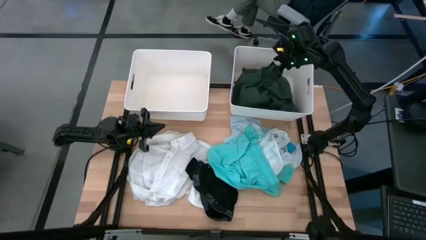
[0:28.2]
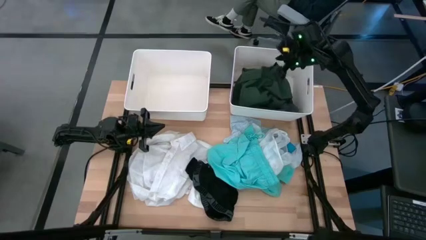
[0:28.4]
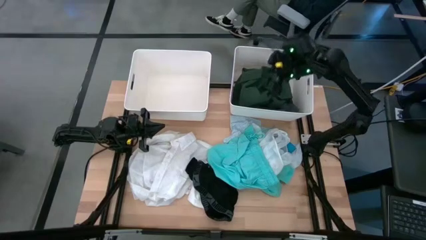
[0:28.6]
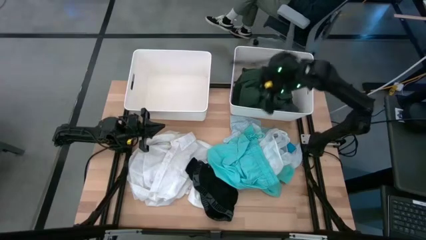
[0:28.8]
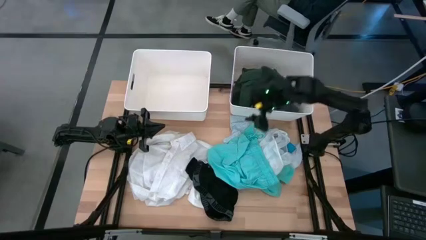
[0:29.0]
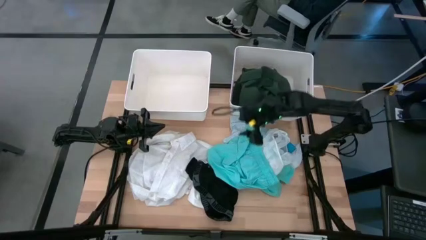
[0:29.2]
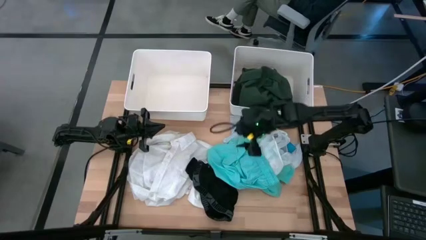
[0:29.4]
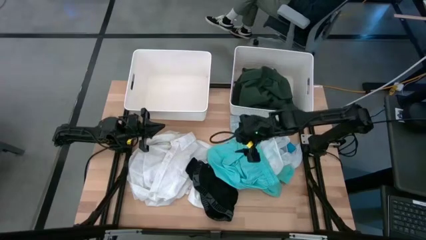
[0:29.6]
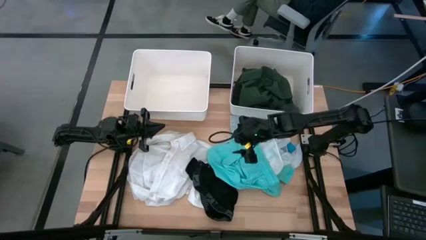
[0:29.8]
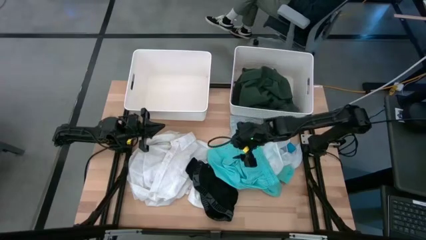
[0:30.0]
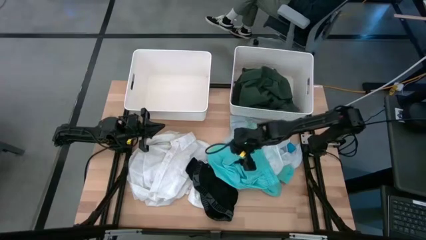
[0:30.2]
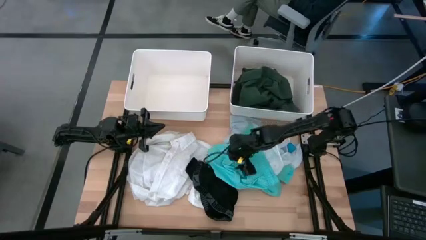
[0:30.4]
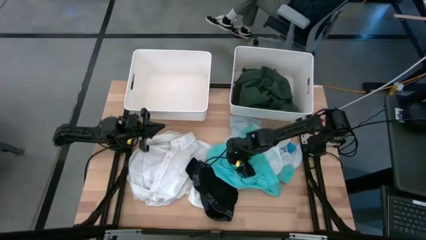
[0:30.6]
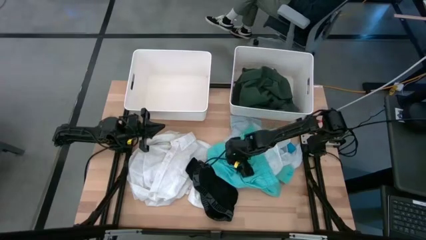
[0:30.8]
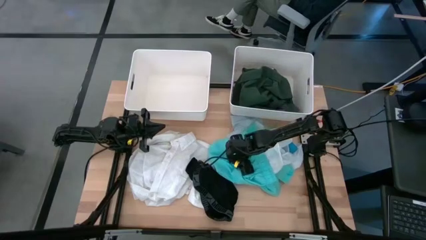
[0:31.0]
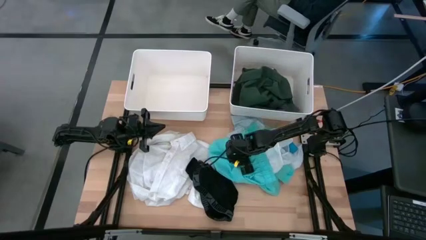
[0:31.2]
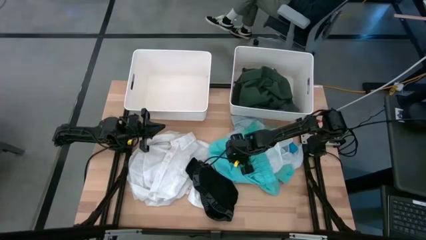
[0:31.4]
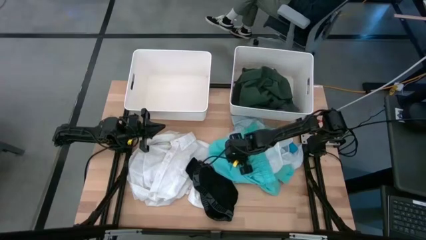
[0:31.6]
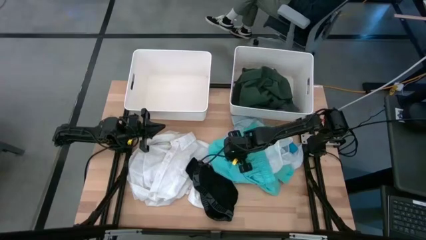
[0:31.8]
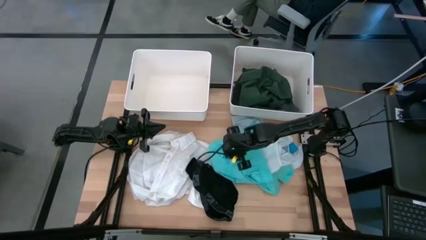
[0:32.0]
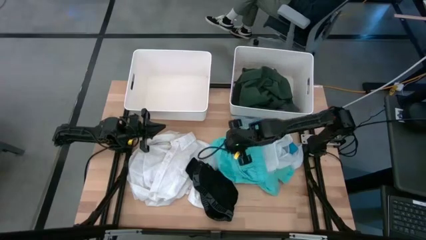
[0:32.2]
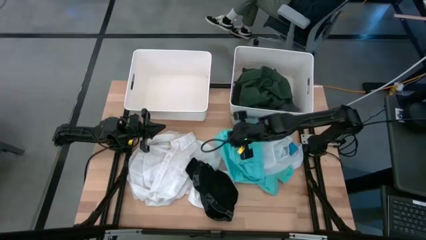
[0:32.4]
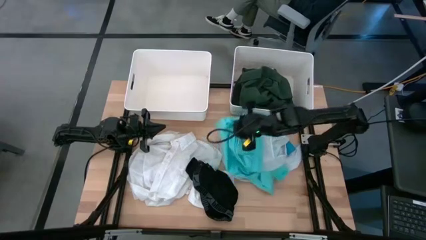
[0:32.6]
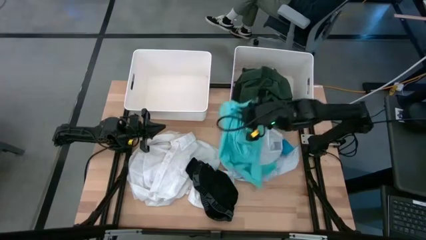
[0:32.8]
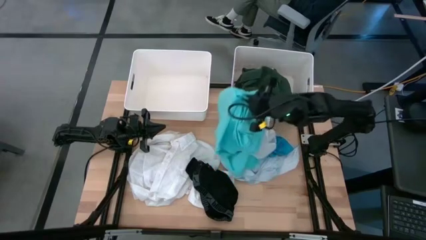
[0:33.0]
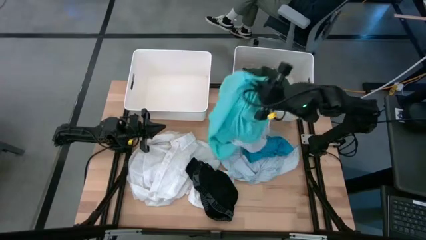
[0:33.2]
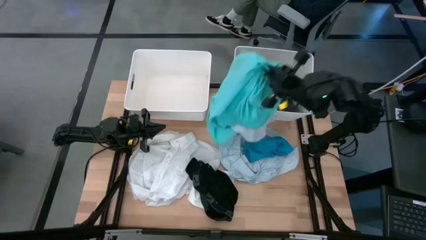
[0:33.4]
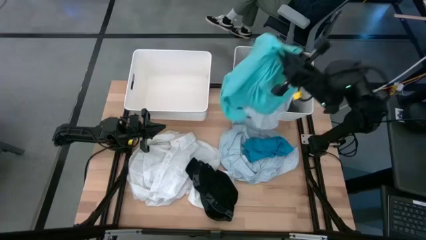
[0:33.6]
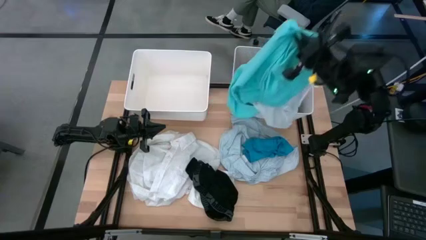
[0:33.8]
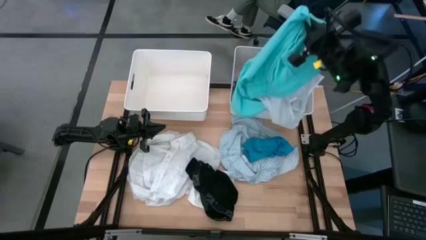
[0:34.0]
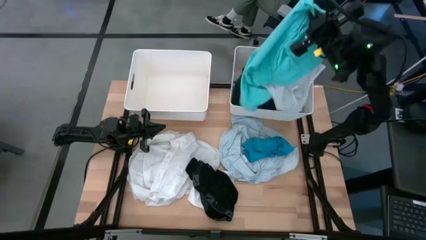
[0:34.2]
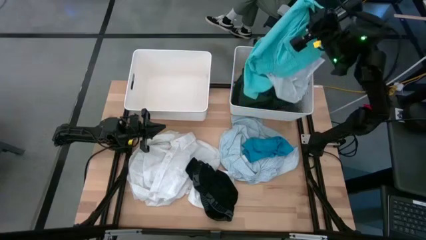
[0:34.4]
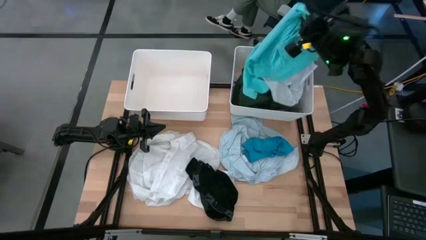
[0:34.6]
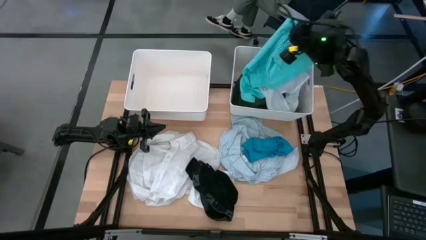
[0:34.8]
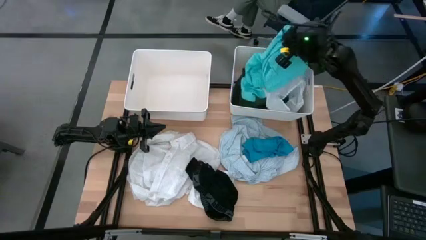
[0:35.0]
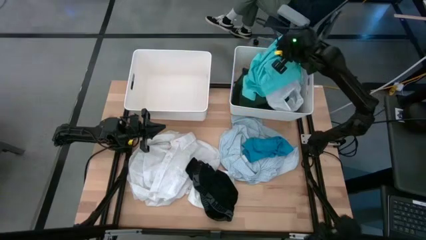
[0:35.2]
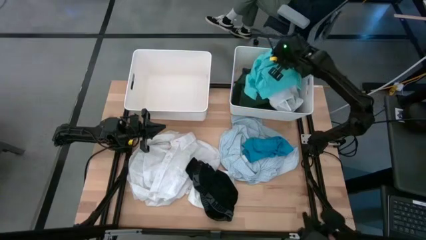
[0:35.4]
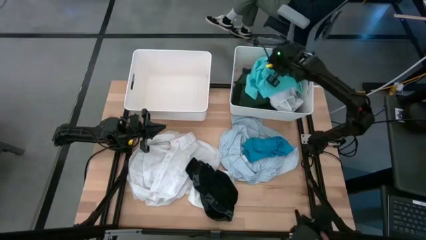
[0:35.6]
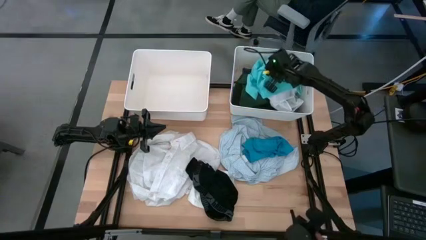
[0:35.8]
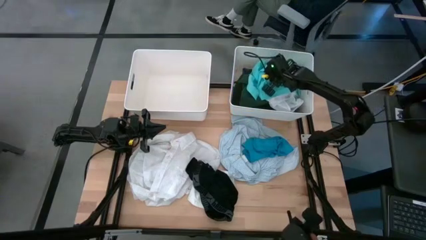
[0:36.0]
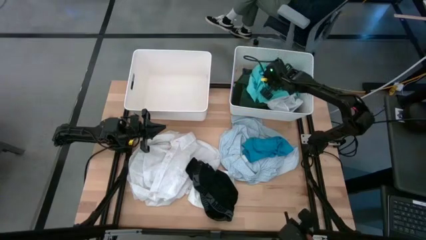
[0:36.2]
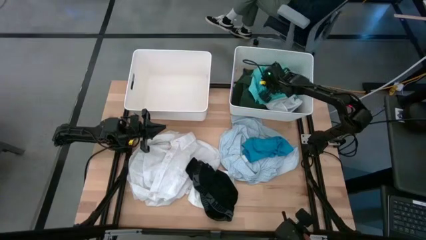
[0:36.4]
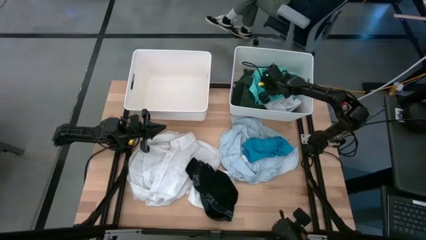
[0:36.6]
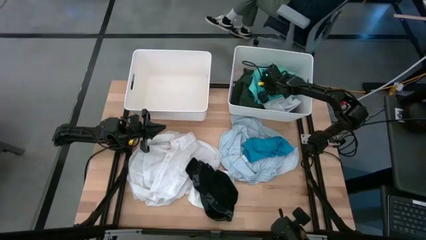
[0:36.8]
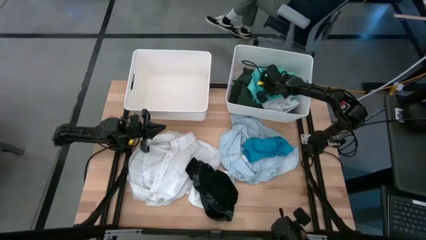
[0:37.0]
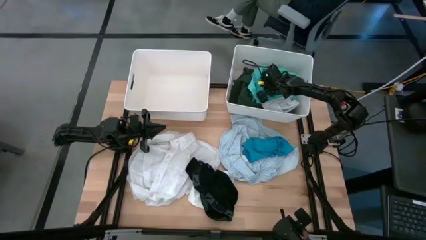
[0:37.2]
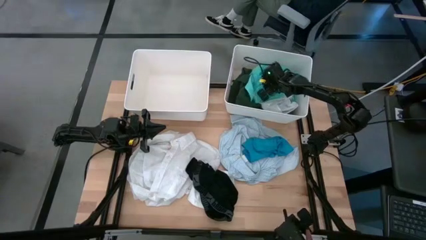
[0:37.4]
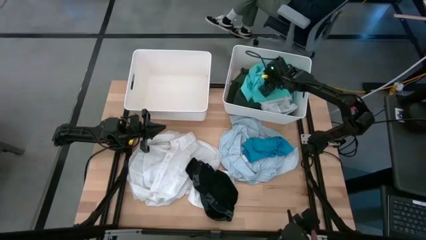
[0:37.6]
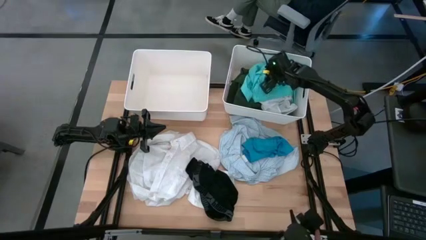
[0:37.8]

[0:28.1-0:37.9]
Task: Sort clothes
Put the light blue shorts into the right white bin

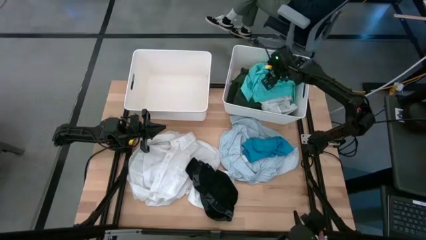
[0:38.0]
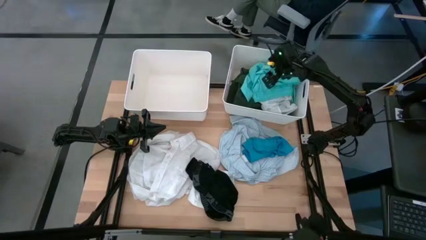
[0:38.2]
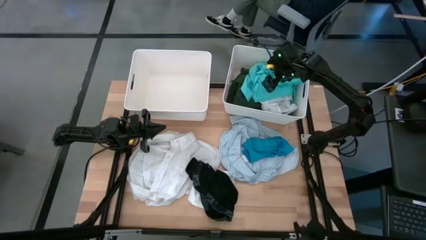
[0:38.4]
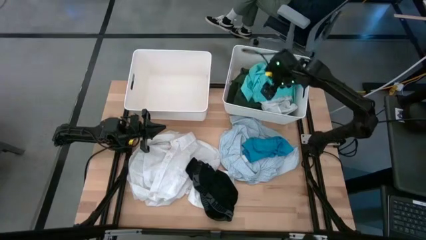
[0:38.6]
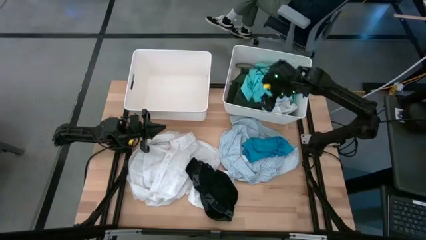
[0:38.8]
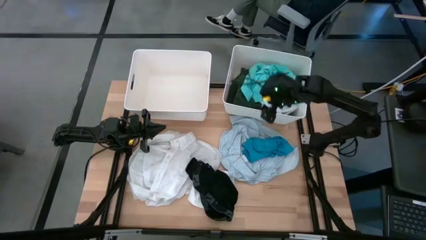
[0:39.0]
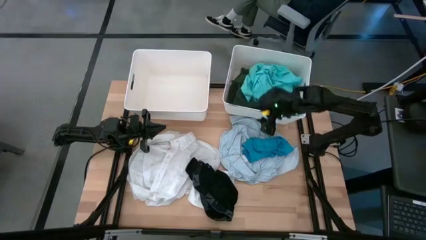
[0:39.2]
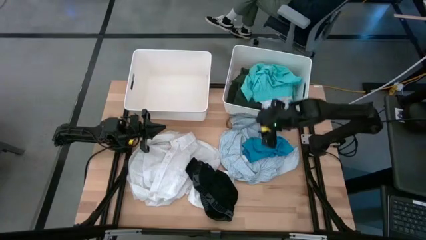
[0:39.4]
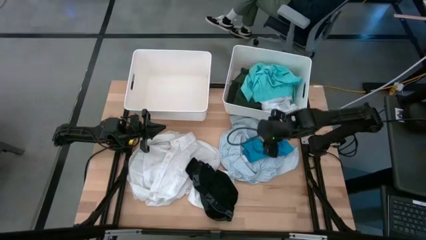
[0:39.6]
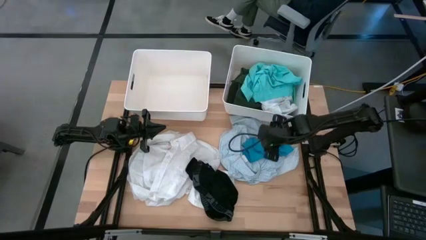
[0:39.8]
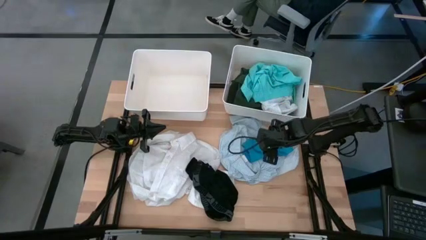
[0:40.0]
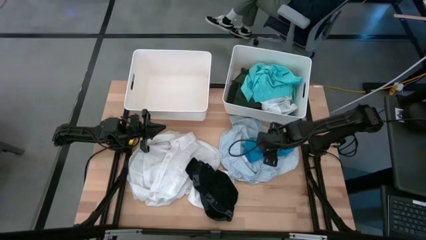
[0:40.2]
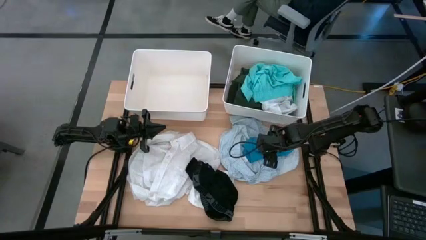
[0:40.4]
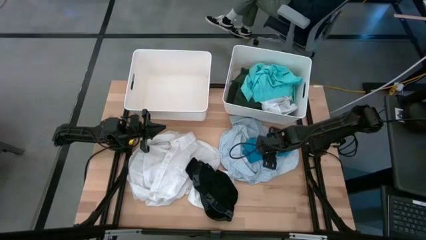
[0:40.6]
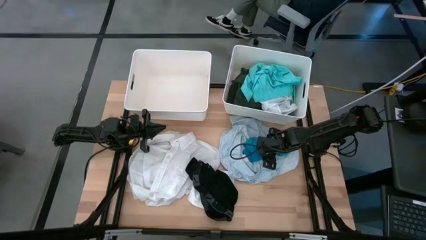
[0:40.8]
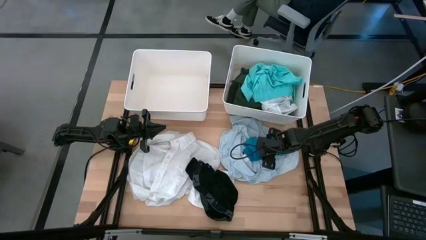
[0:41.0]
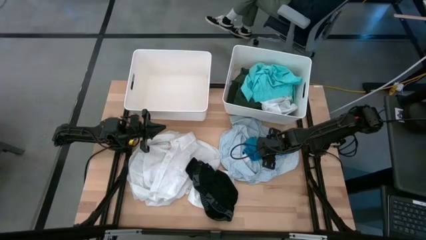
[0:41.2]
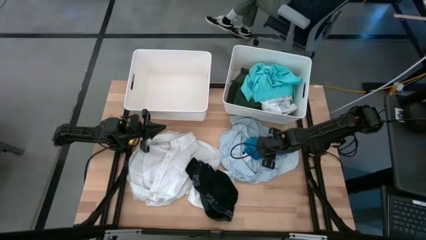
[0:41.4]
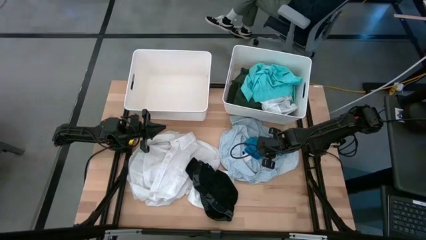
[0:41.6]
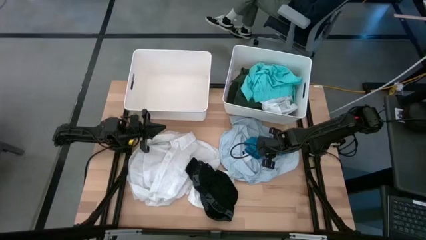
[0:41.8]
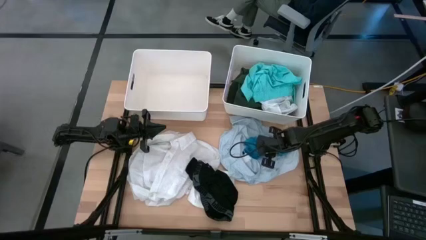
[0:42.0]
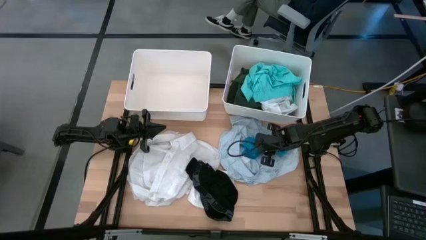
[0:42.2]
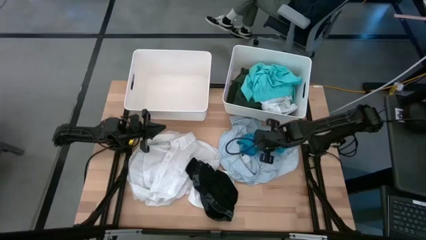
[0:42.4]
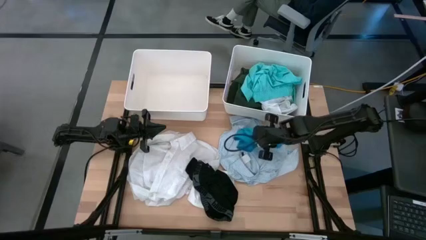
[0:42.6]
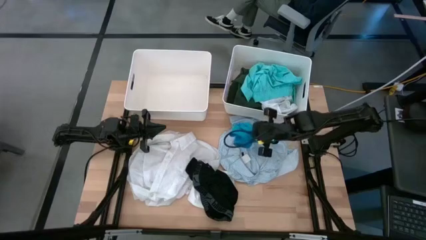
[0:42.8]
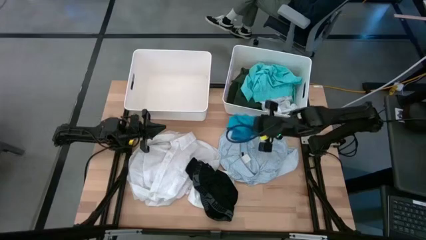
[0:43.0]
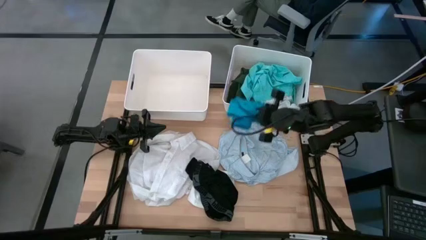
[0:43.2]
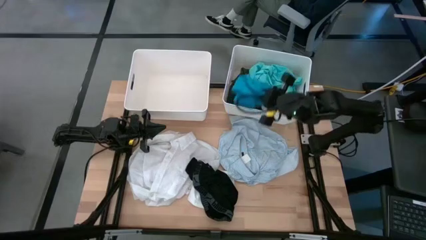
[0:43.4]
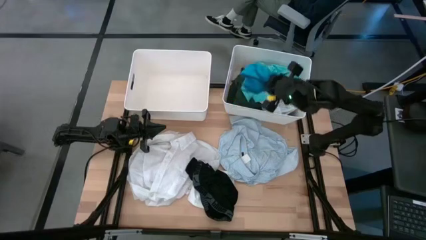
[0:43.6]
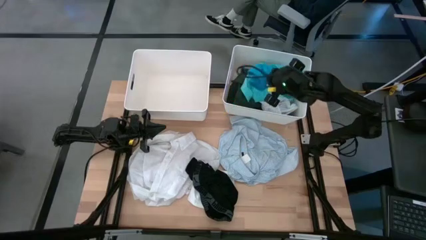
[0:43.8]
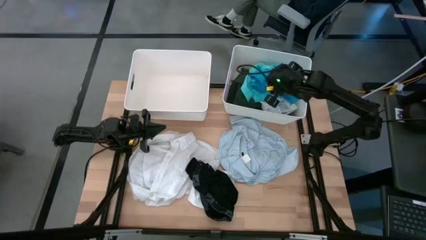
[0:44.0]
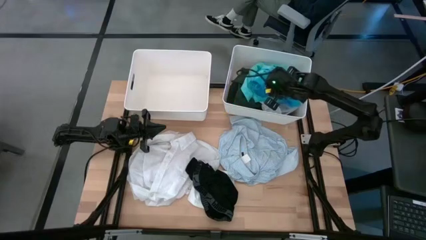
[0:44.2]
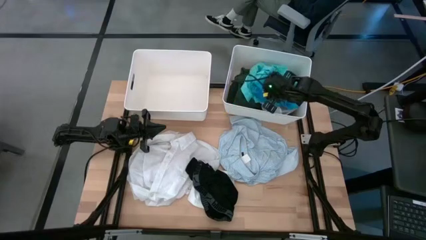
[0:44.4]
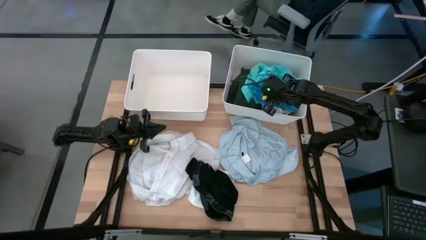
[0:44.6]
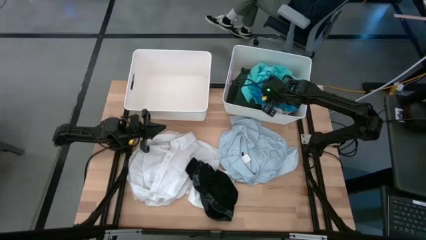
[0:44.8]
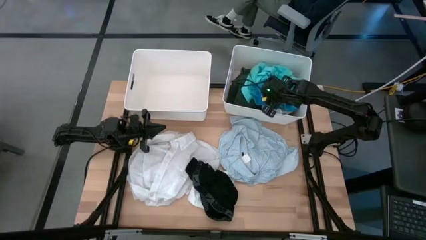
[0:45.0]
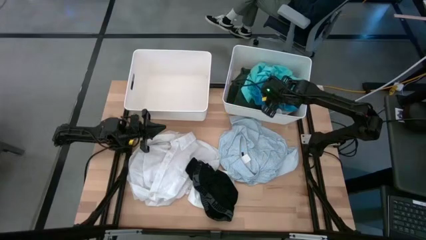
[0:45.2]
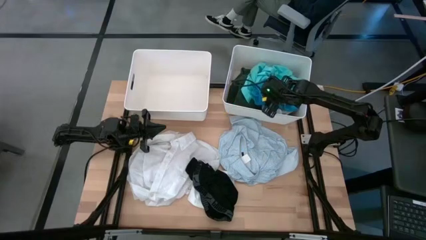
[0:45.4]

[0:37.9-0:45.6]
Put the blue shorts into the right white bin
